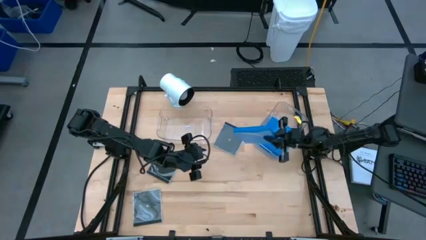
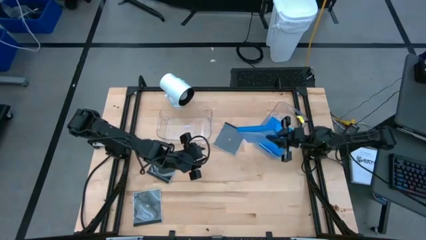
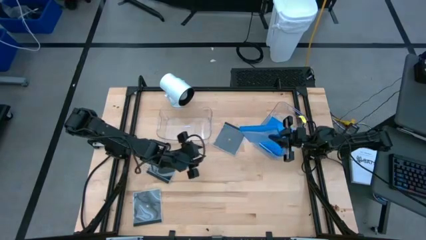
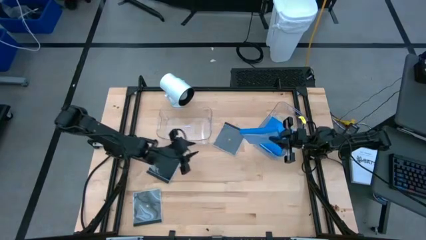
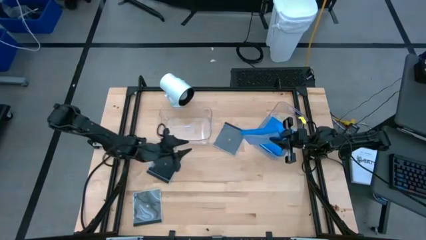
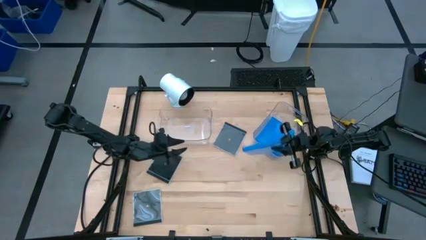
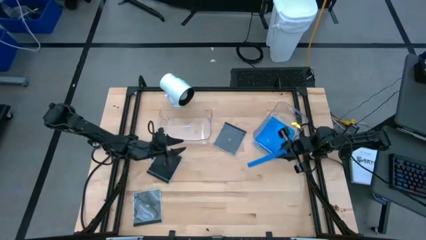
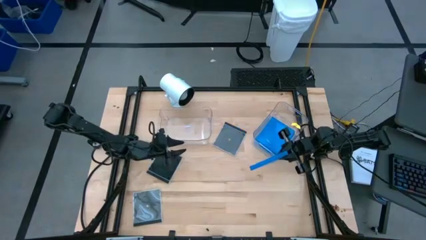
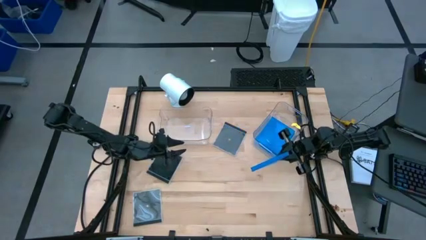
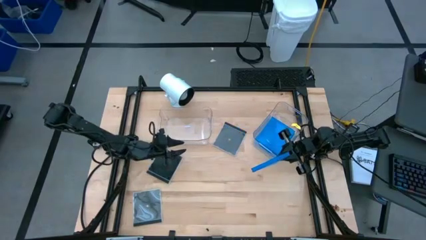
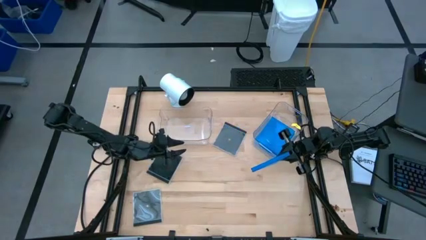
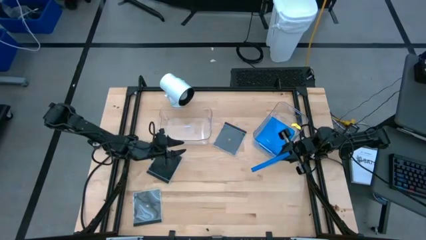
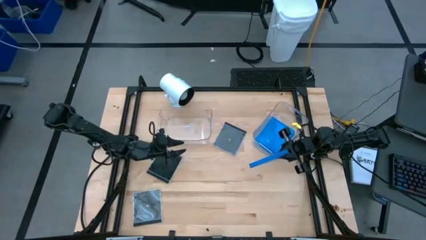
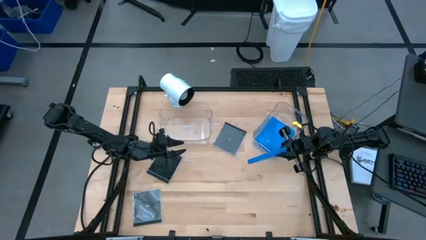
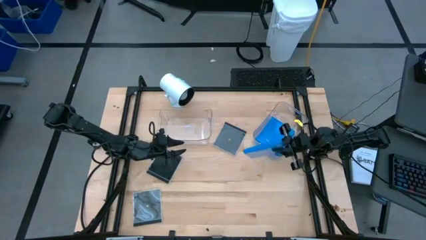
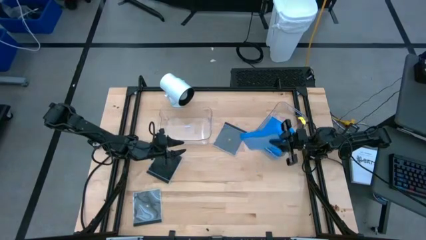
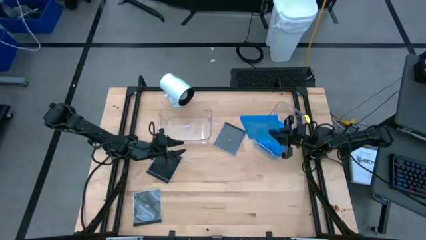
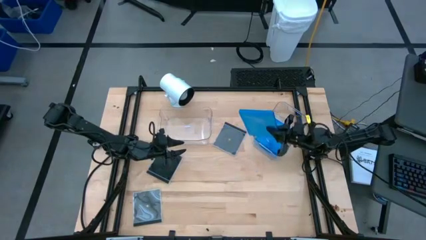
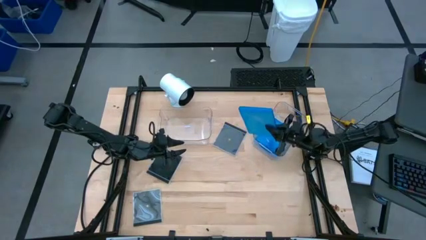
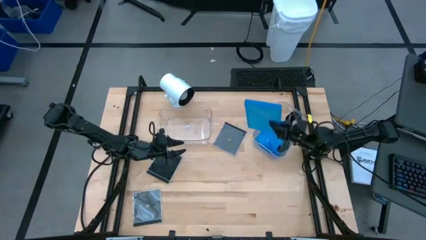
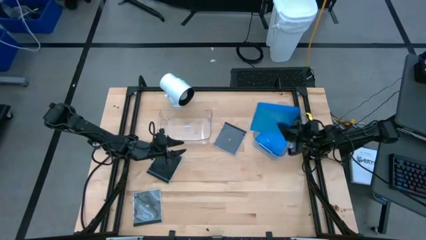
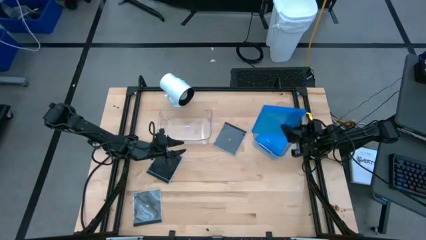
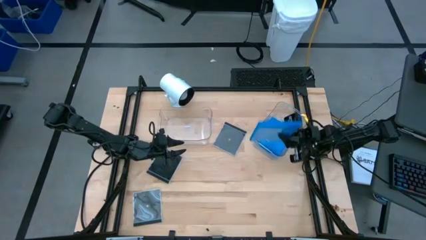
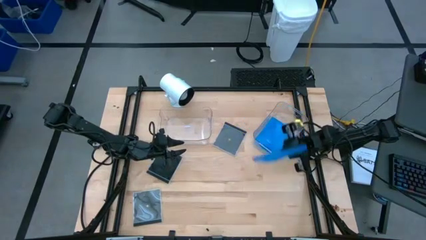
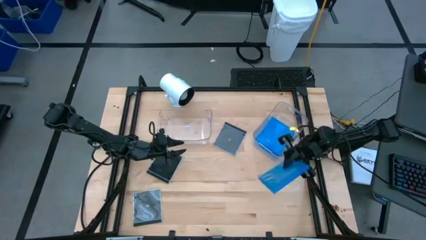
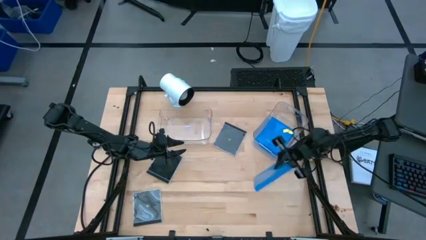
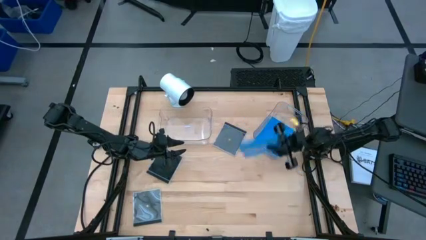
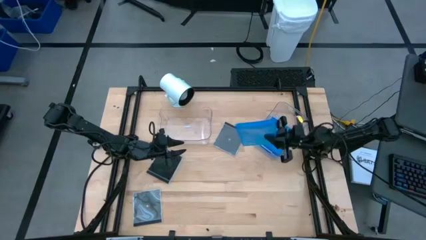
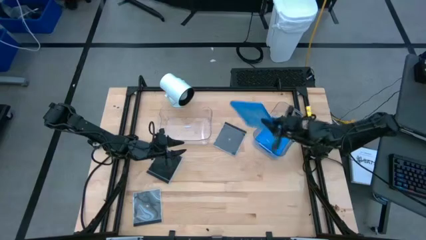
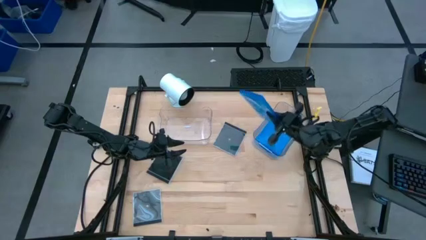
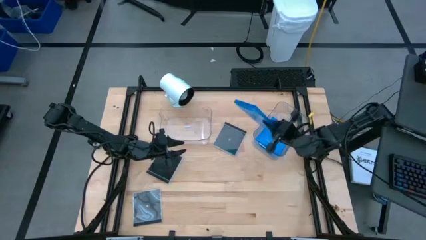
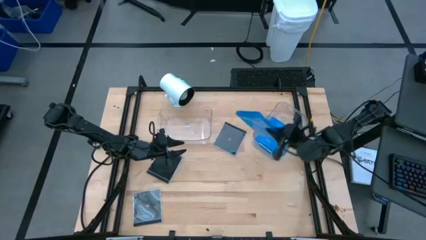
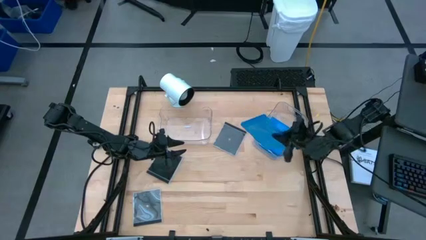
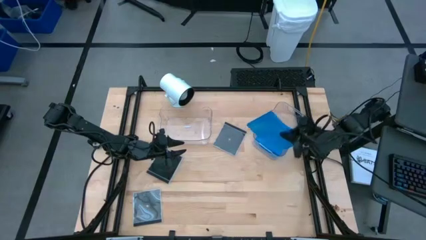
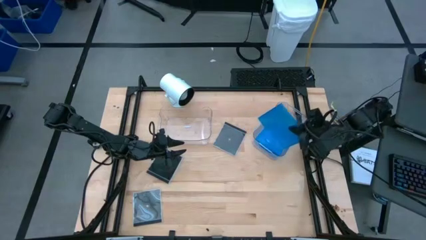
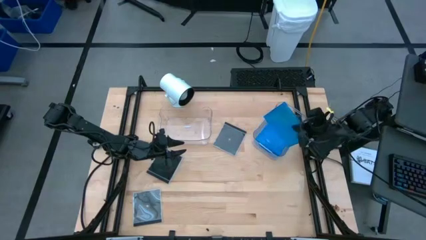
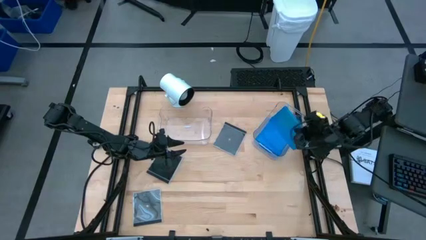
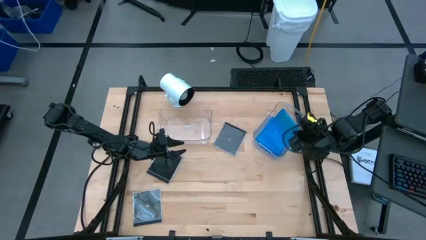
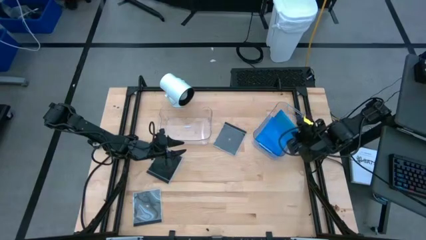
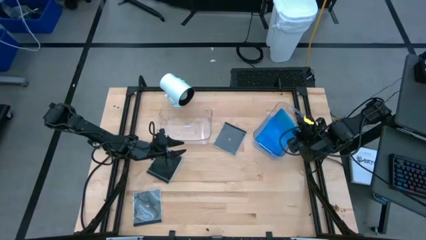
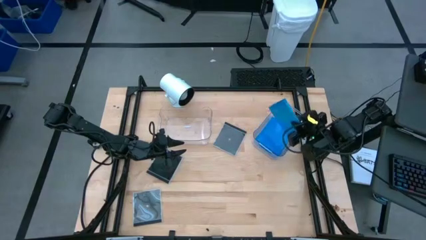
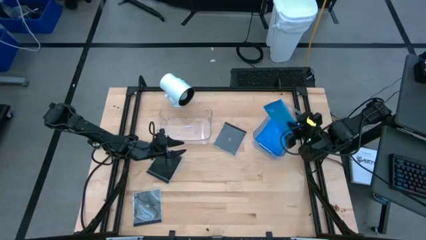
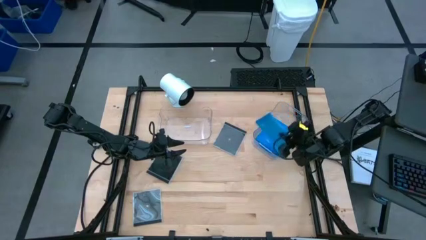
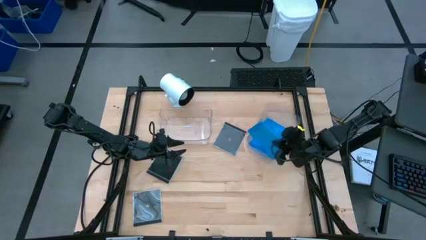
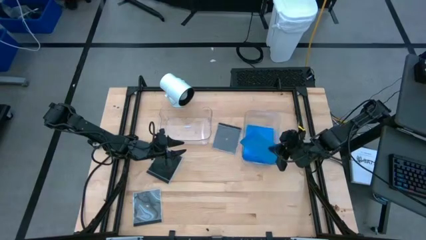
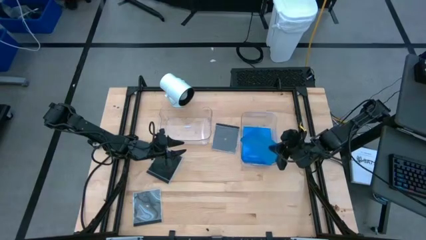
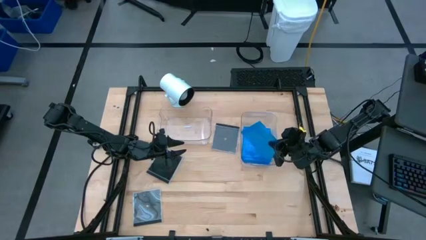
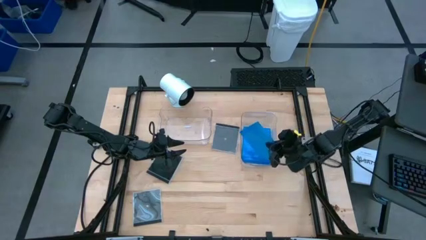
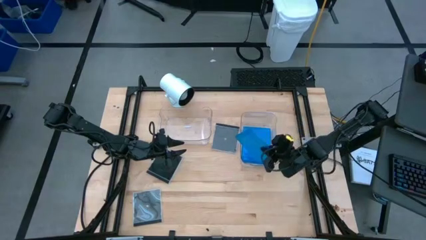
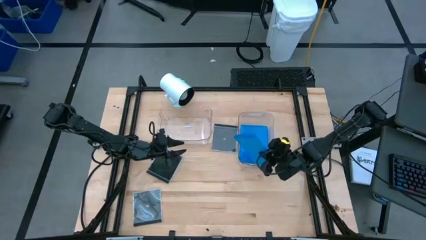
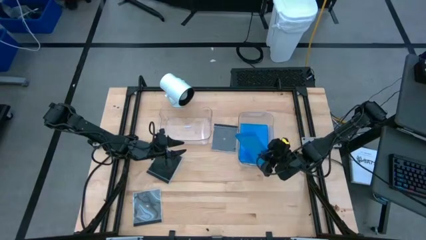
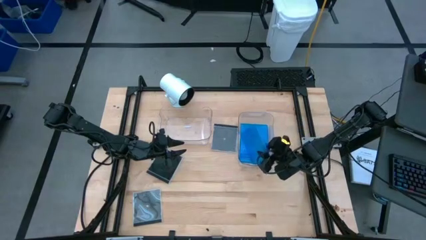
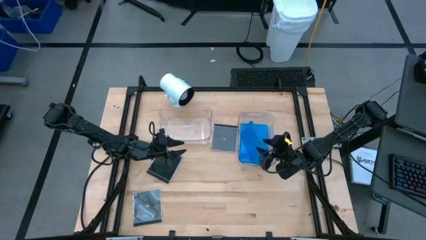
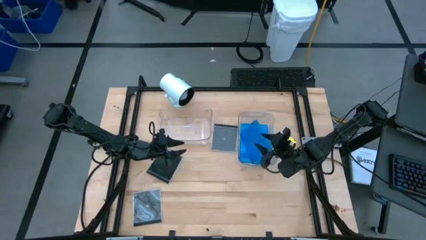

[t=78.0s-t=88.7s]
Task: Pick & place jewel cases by type
Put the blue cd case into the right transparent bin
